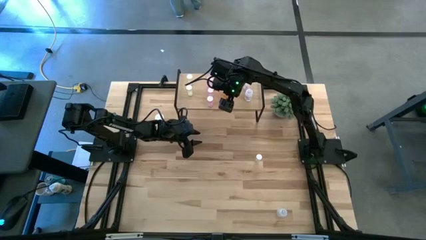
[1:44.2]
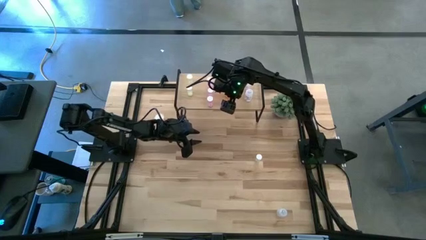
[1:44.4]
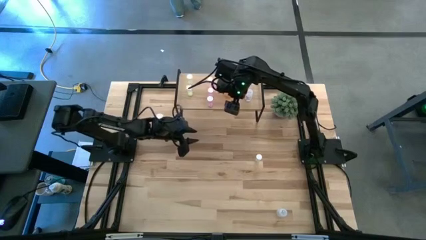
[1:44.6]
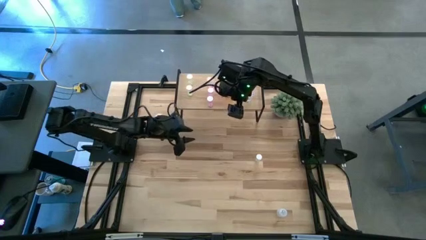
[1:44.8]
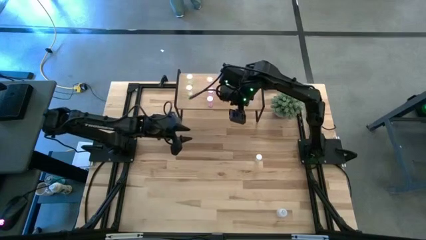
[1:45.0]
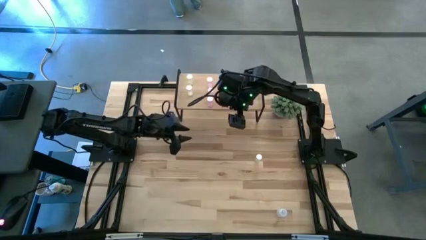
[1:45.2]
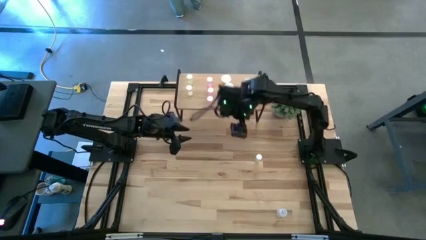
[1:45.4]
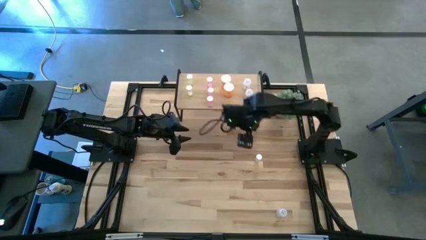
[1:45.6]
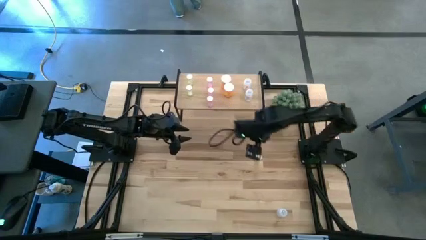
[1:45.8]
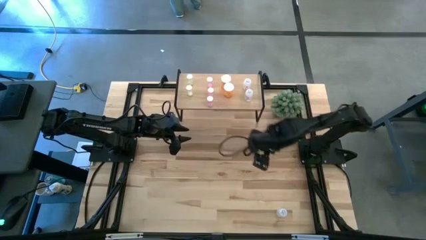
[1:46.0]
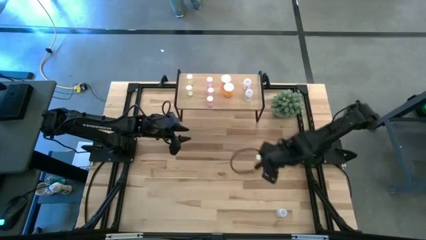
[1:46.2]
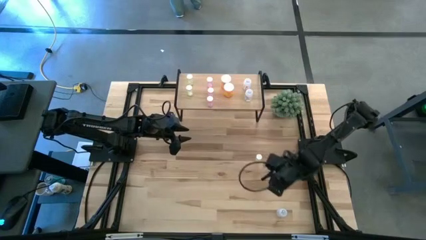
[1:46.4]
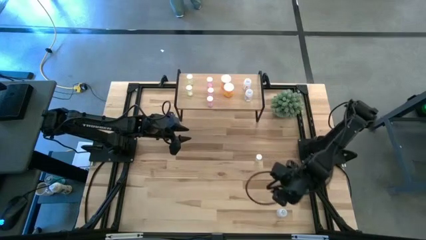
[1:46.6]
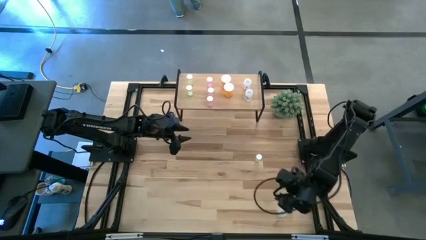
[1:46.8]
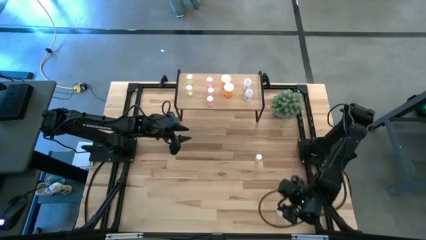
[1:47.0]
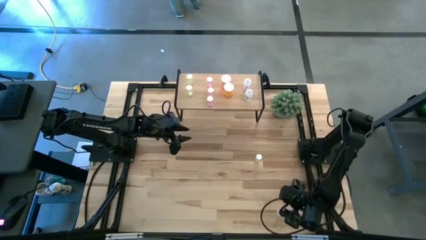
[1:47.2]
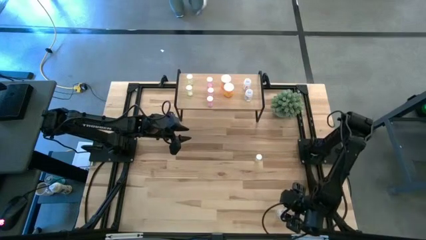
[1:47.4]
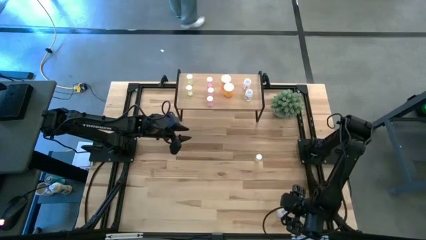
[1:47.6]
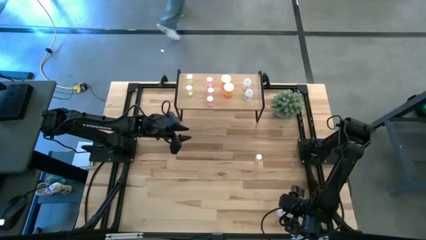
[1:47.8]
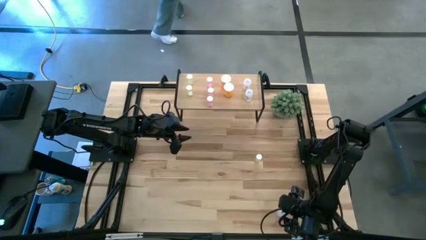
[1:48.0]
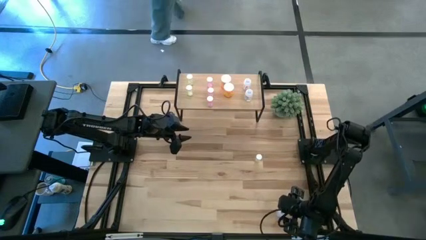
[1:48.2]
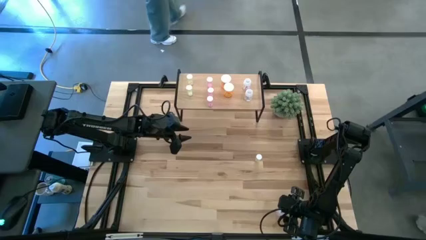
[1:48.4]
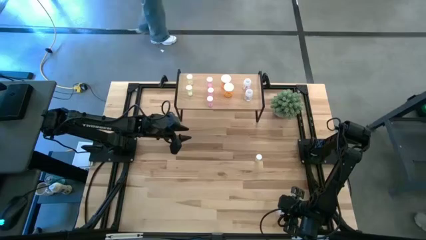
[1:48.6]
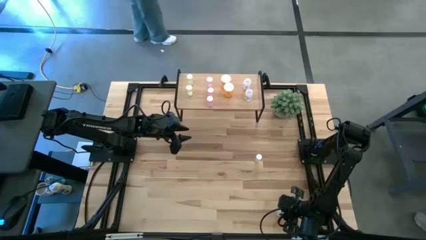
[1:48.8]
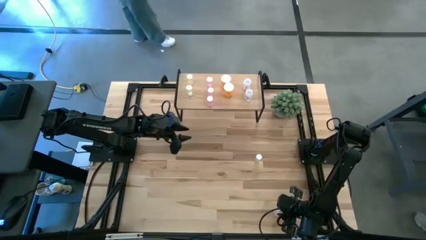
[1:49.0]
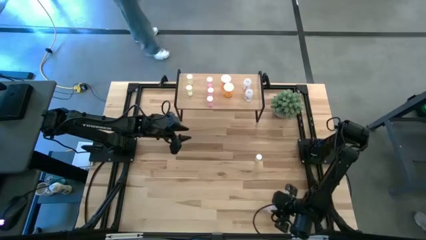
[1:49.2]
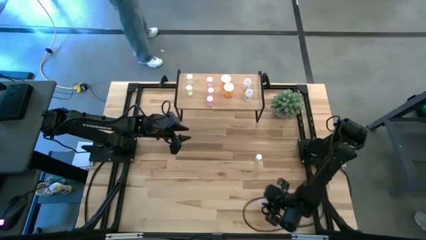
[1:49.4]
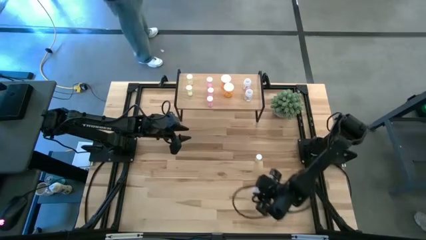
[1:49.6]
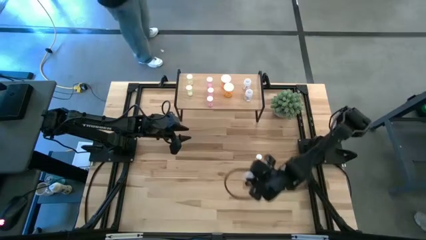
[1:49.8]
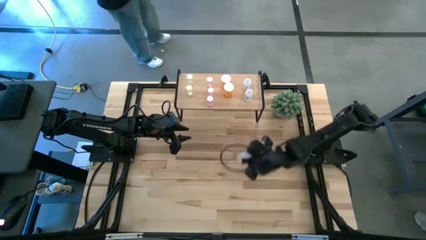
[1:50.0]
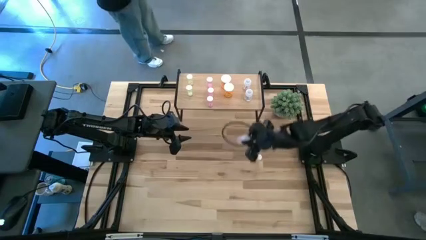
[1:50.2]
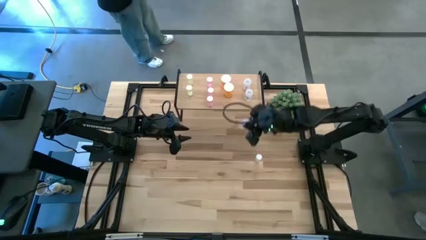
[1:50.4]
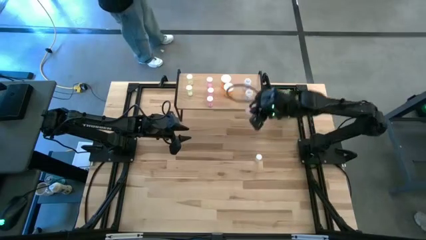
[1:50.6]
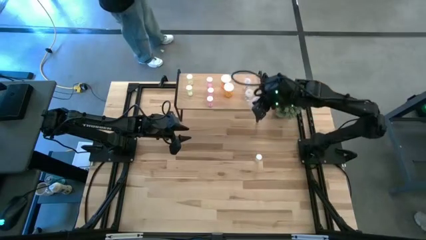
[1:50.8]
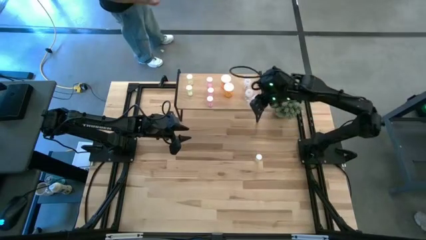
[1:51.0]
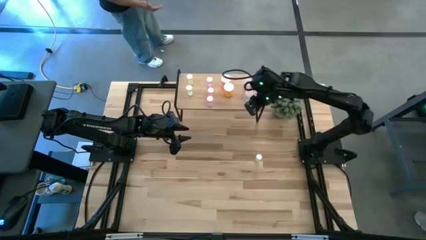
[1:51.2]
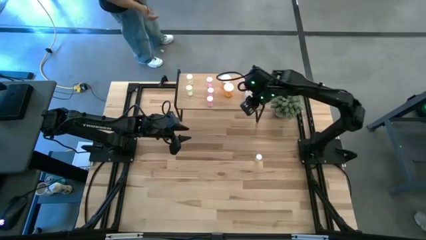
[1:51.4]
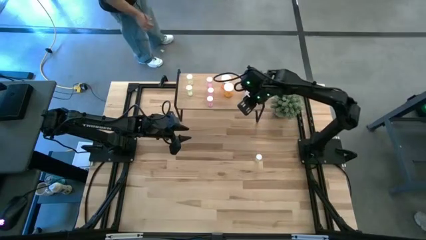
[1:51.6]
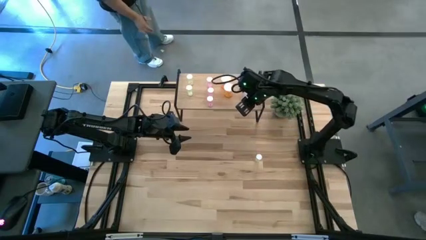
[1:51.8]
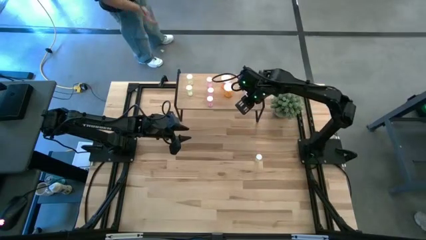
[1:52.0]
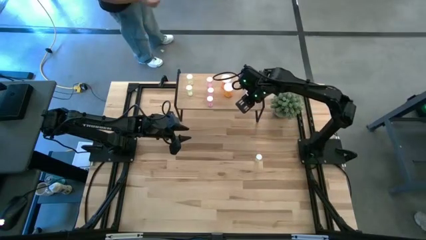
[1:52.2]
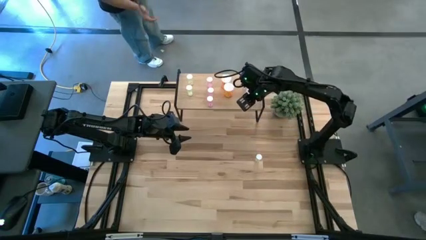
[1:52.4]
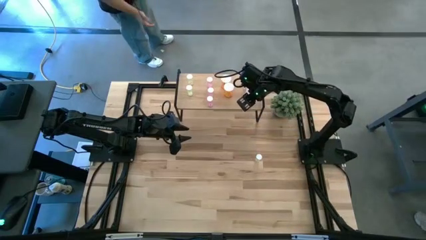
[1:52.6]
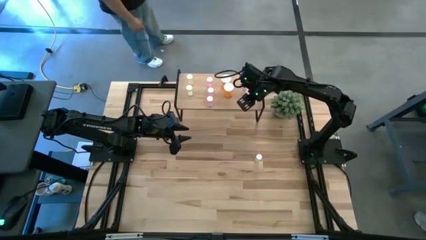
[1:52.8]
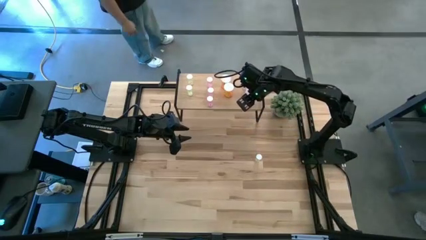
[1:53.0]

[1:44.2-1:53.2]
Task: Pick and place medicine bottles onto shelf by color
Put the transparent pill bottle aligned with the other transparent pill bottles on the shelf
